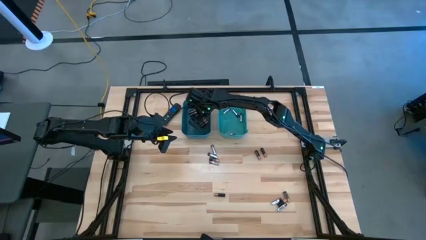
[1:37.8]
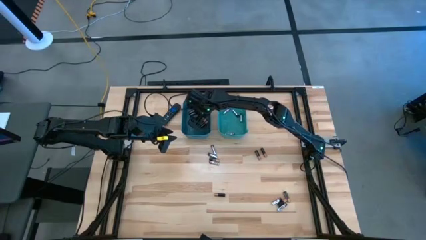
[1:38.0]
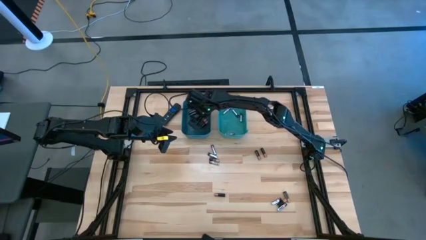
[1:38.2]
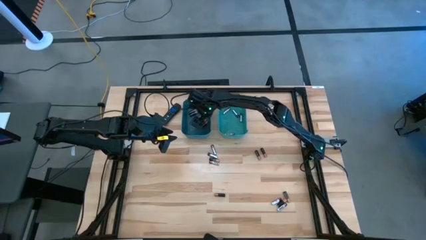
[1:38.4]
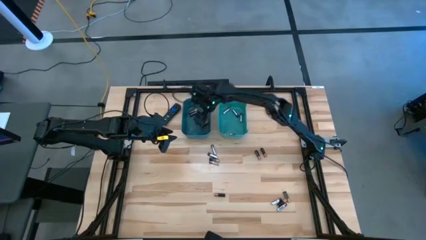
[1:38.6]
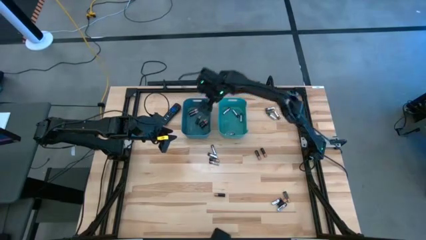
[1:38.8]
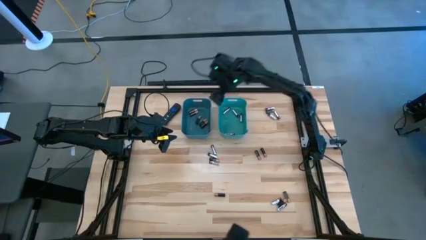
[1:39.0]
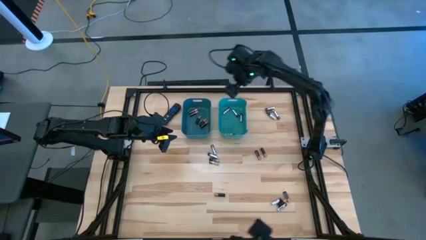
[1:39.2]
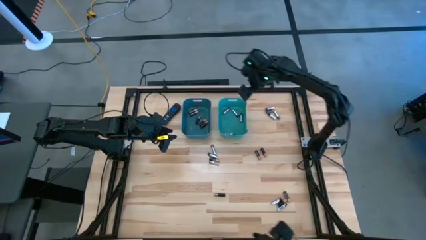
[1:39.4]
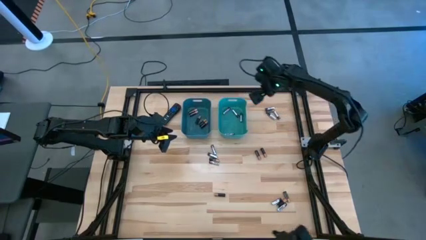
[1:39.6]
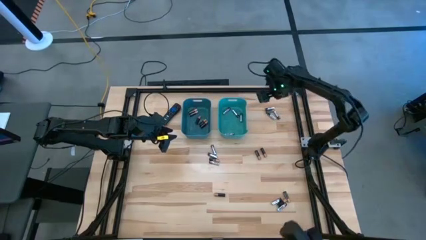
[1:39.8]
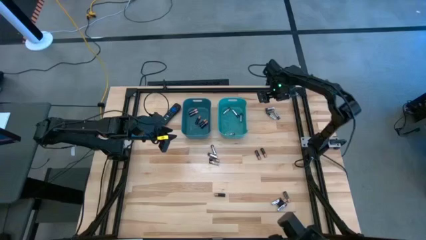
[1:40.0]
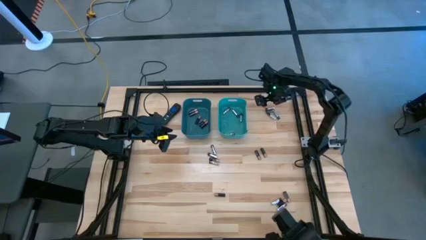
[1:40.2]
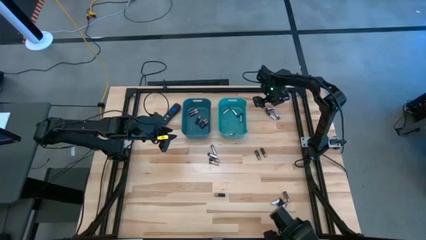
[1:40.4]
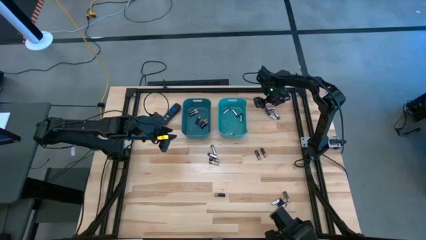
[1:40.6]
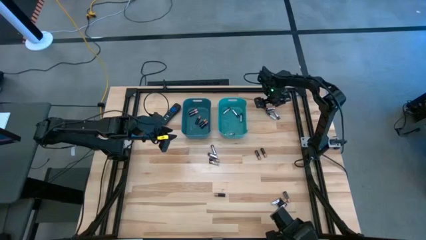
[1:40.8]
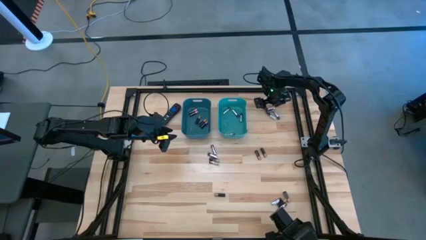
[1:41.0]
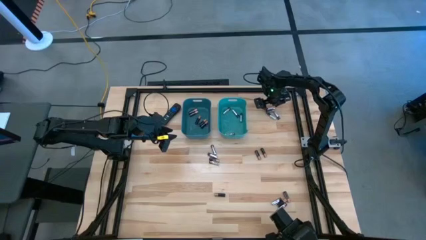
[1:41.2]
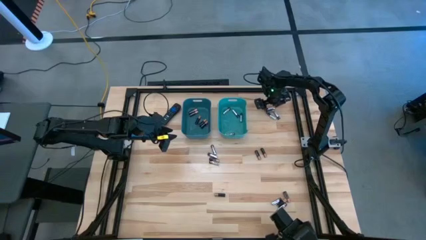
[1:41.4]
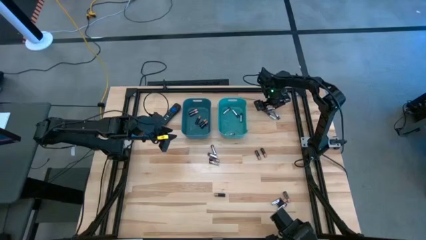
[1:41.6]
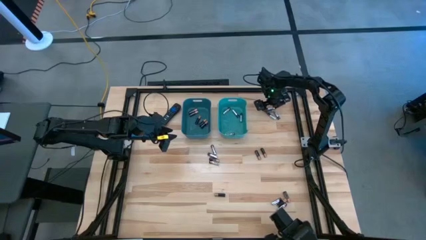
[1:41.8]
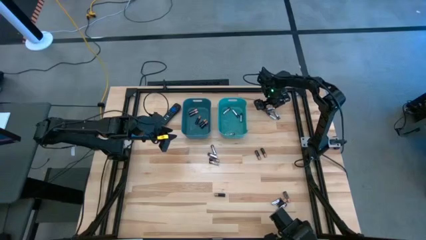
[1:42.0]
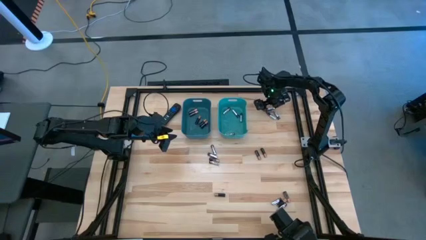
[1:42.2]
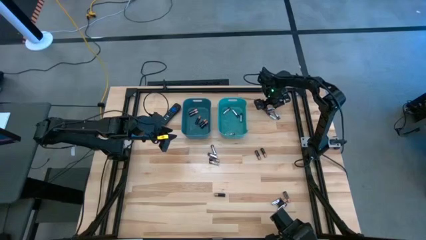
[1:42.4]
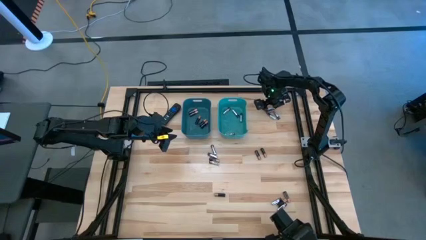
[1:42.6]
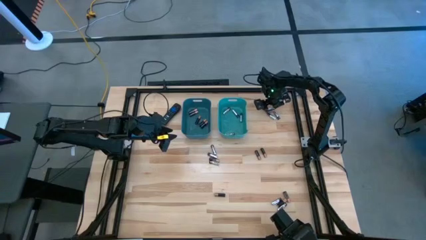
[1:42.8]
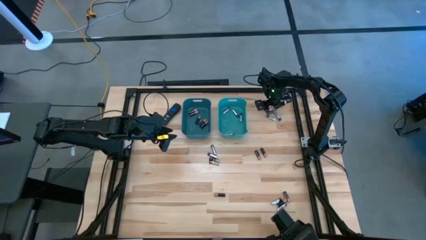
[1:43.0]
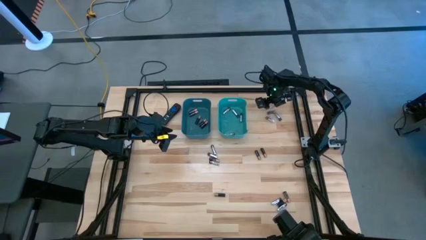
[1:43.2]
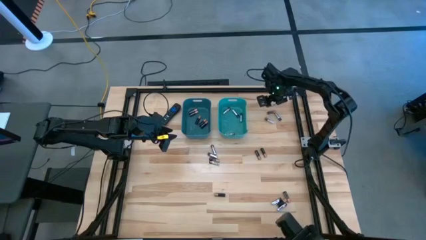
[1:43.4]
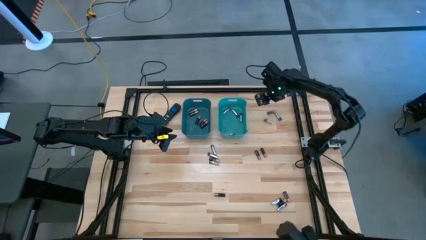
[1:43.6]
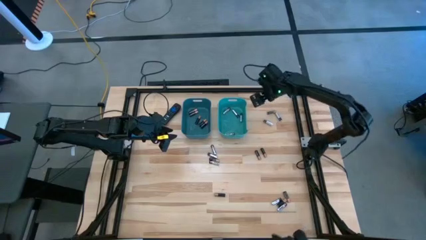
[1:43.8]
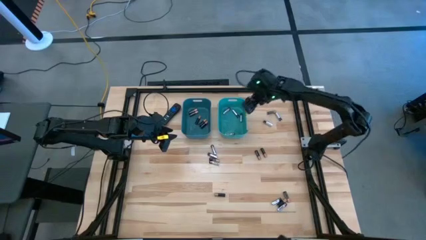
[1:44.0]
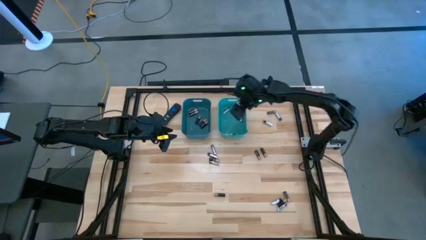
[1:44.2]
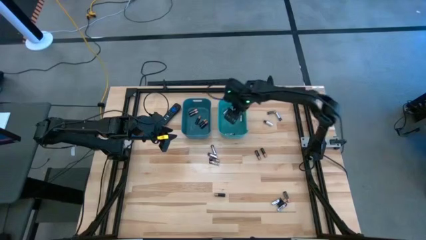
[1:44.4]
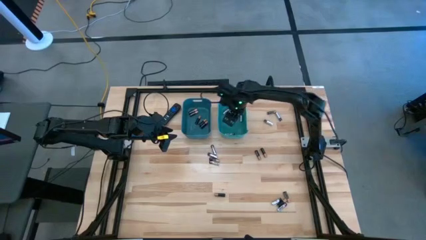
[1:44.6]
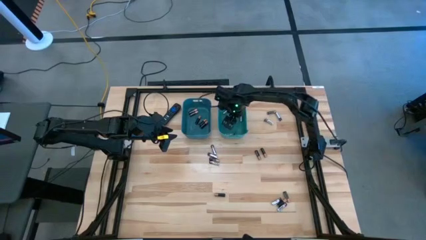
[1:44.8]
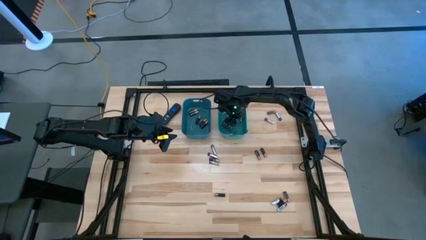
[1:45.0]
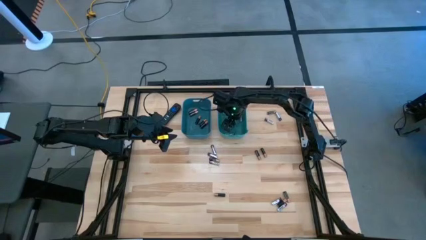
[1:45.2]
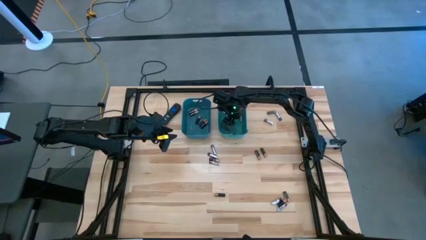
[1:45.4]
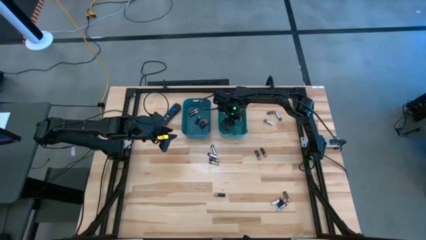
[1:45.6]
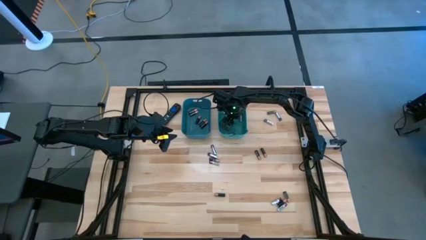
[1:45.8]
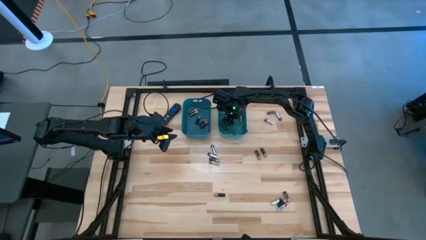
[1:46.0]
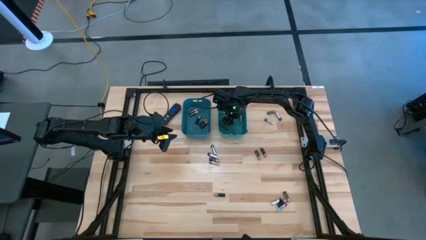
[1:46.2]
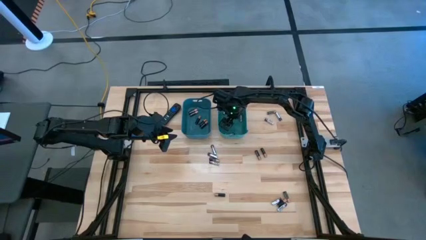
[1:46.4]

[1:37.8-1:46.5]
Task: Sort batteries
Put the silver battery into the green bin

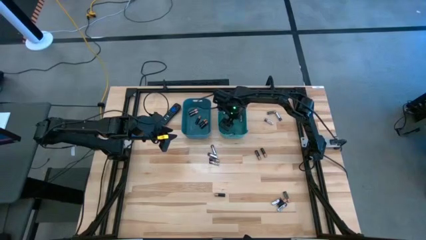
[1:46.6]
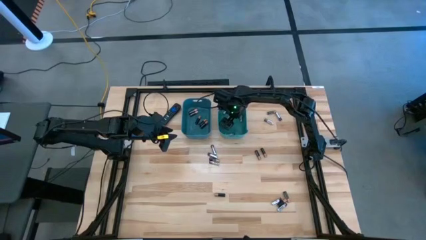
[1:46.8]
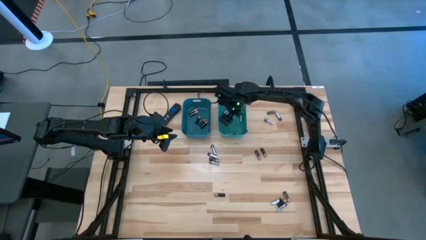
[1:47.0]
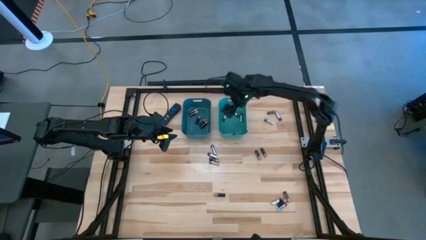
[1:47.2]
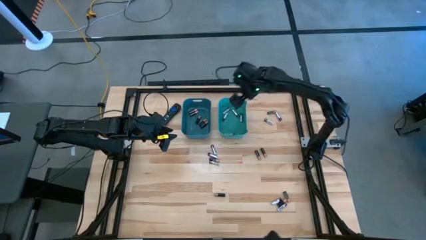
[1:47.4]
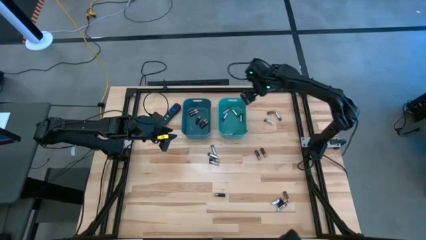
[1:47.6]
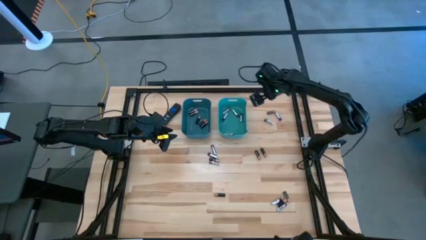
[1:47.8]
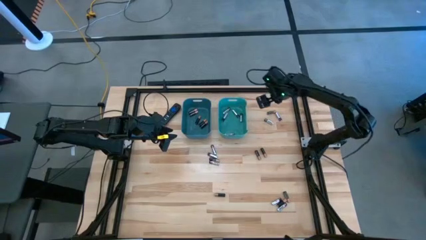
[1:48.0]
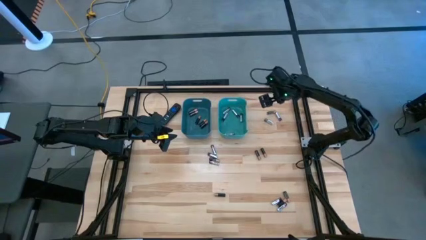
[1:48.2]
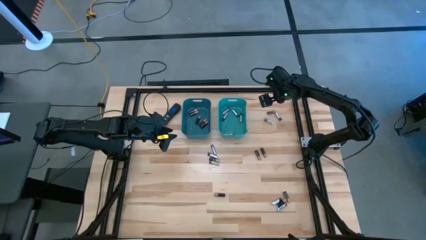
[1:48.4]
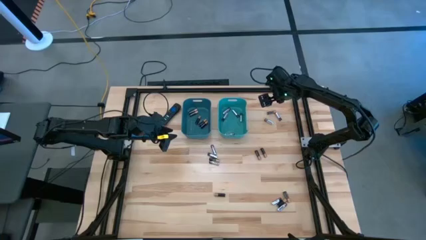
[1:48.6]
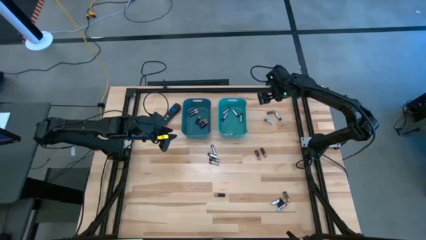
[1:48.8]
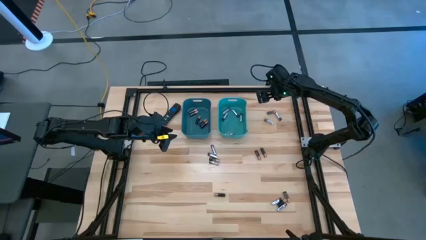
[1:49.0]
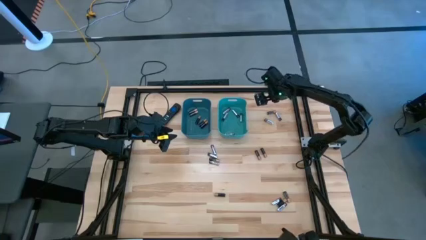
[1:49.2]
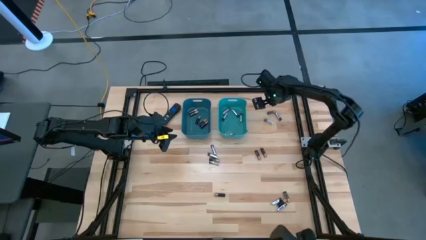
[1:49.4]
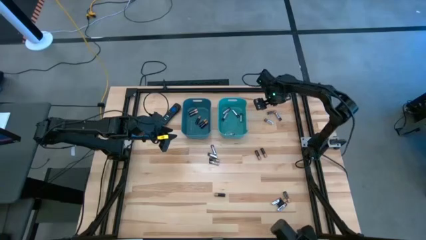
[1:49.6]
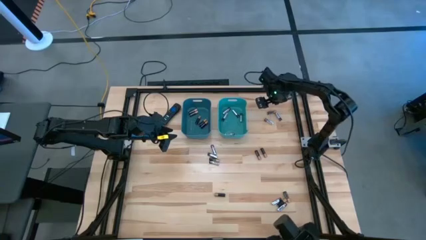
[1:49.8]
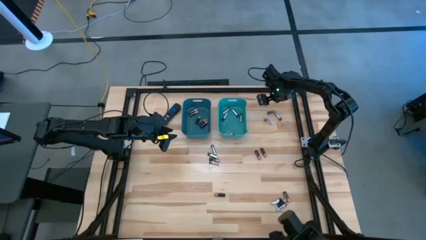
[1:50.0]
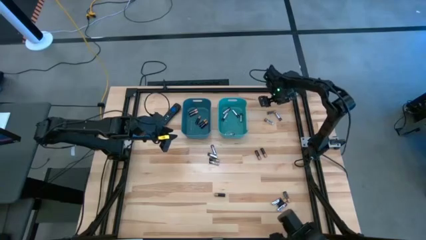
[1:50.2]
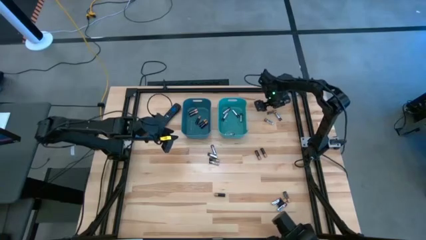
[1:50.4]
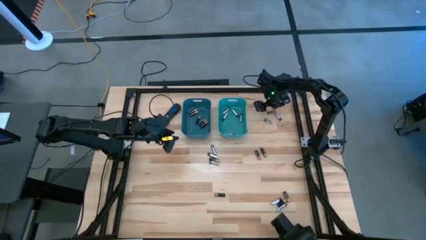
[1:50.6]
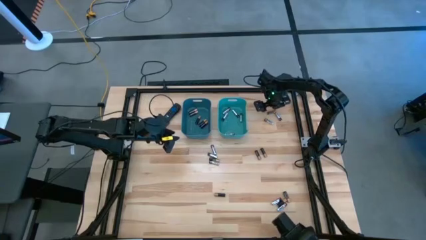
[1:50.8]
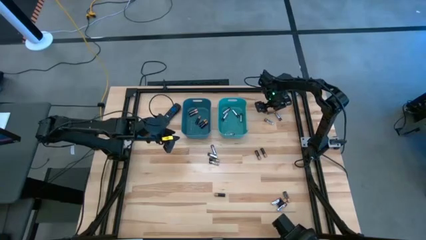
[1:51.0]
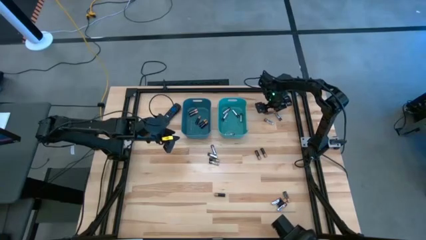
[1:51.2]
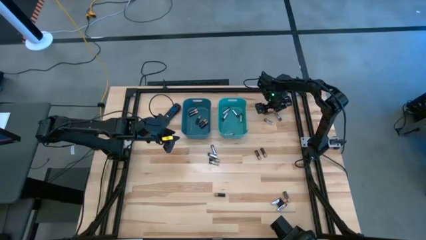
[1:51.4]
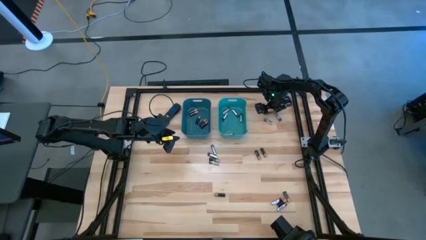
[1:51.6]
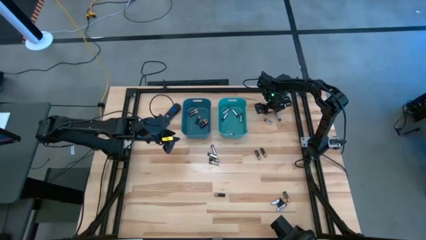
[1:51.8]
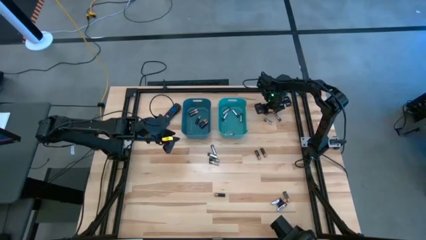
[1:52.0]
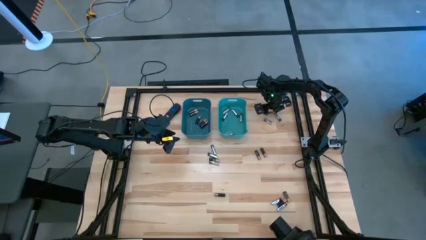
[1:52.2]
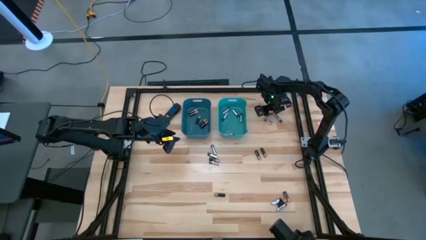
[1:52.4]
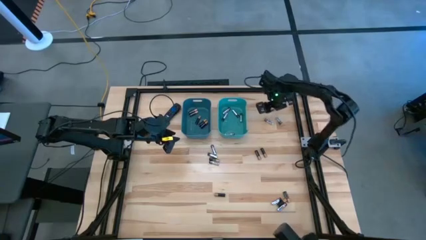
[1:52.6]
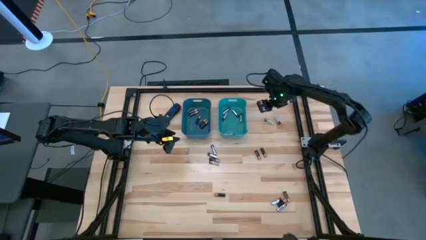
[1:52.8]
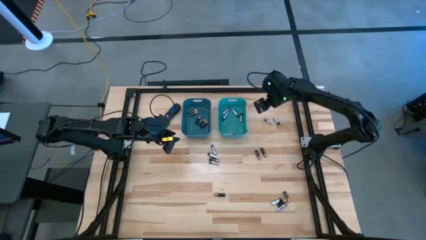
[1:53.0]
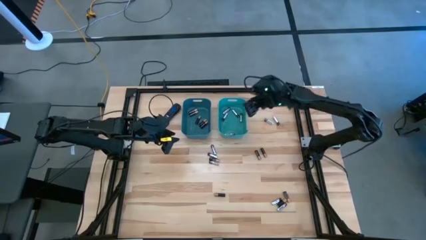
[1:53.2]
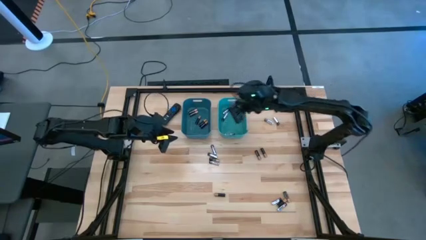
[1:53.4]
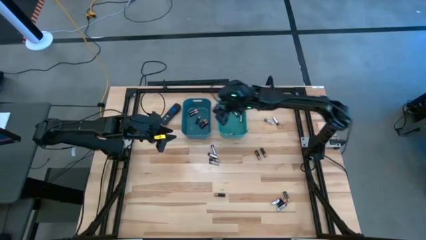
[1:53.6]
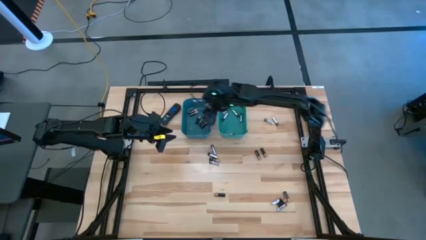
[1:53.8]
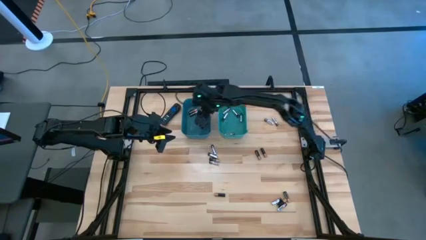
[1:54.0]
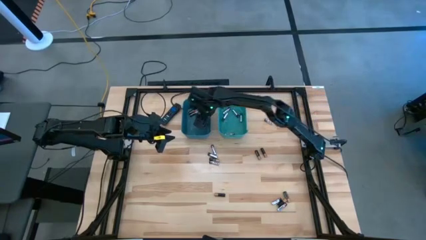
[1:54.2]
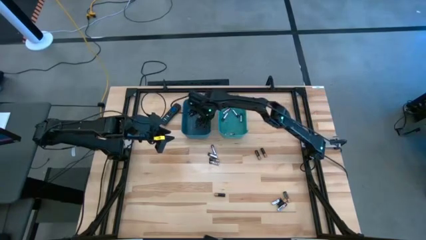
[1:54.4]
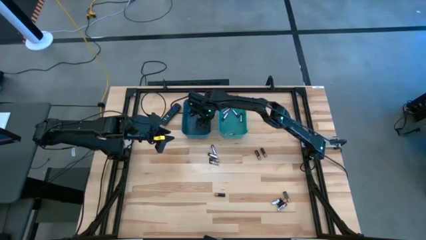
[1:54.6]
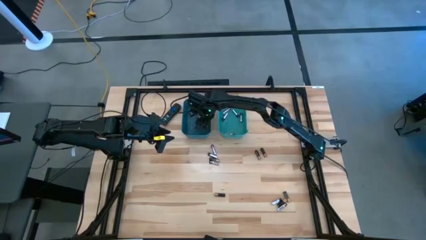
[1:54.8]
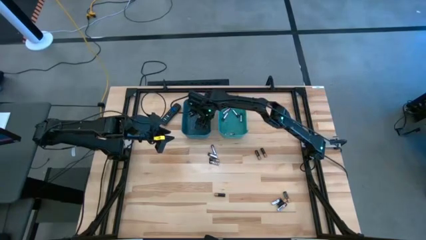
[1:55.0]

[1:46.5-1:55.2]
Put the black battery into the blue bin
